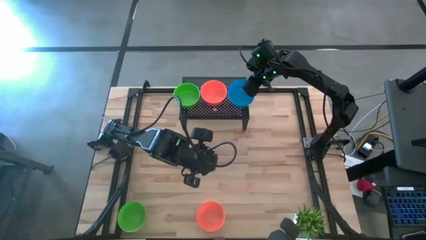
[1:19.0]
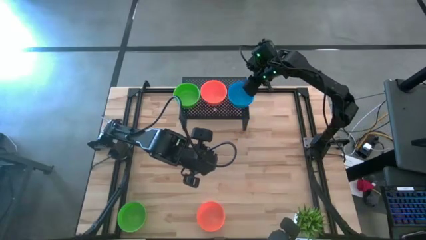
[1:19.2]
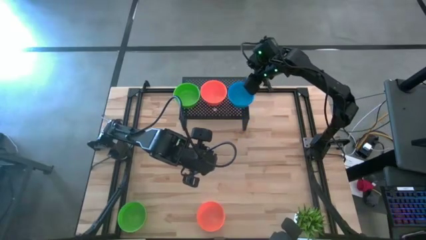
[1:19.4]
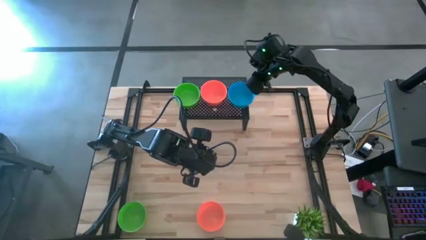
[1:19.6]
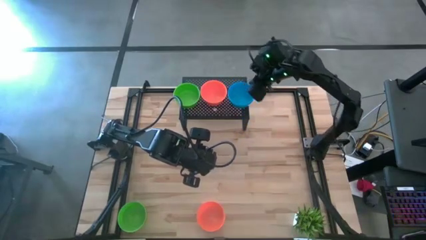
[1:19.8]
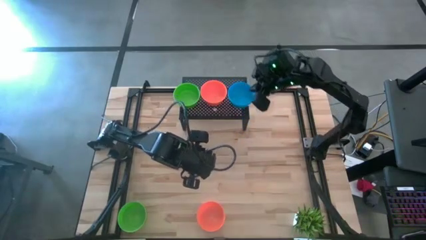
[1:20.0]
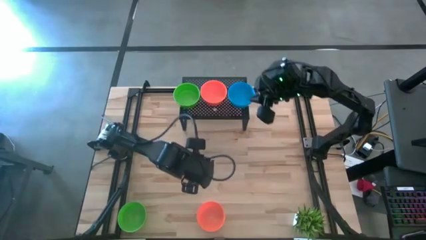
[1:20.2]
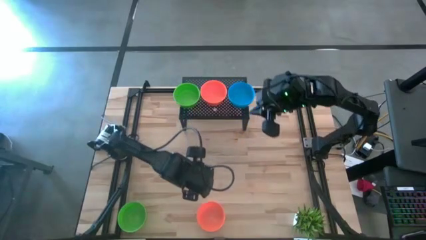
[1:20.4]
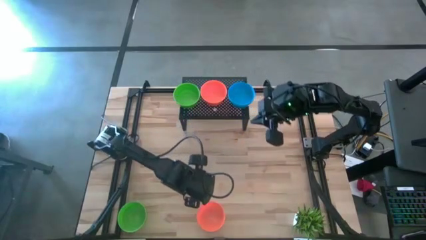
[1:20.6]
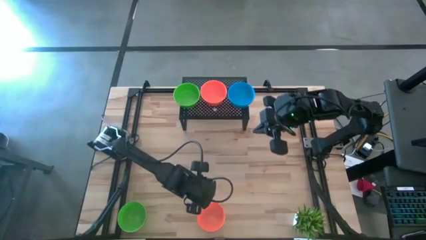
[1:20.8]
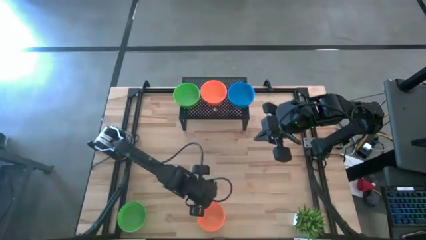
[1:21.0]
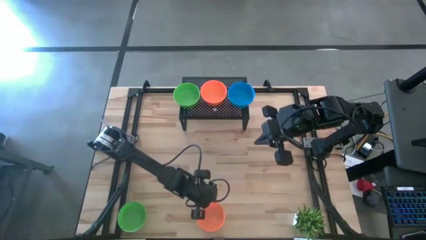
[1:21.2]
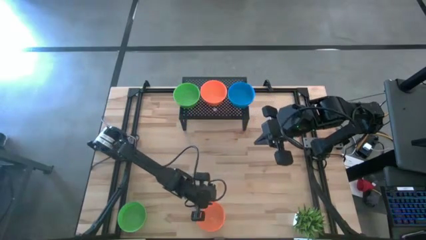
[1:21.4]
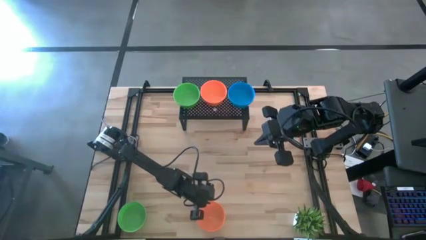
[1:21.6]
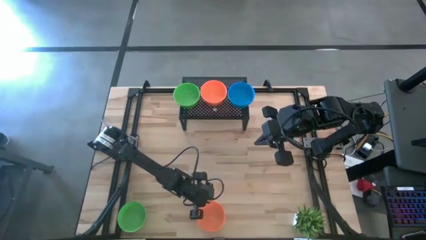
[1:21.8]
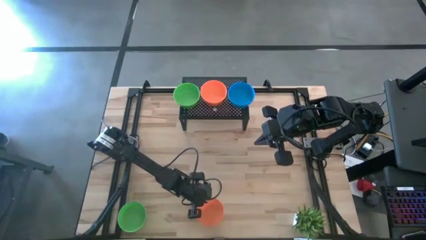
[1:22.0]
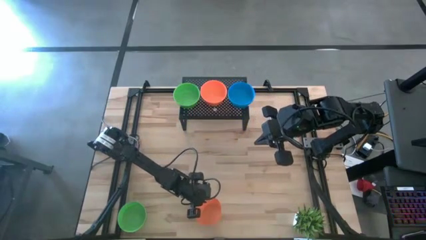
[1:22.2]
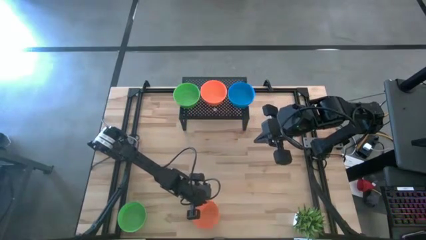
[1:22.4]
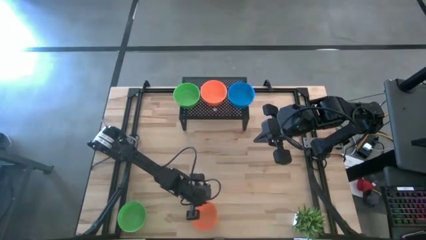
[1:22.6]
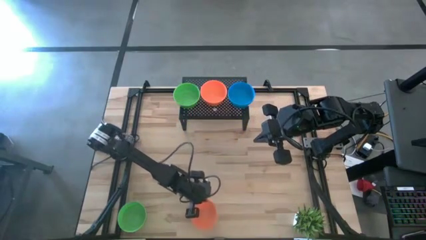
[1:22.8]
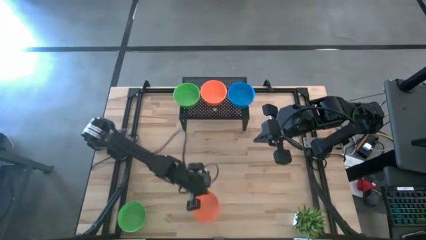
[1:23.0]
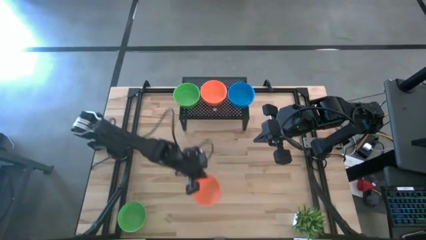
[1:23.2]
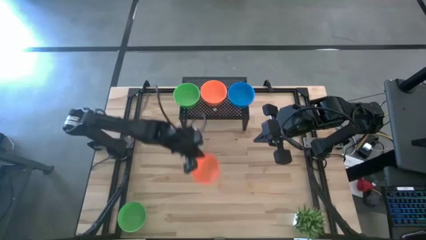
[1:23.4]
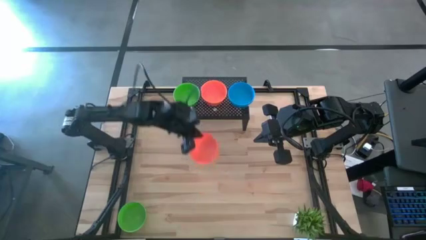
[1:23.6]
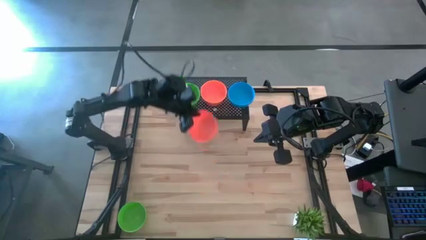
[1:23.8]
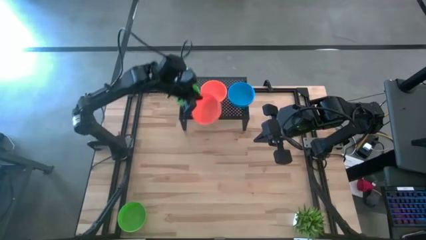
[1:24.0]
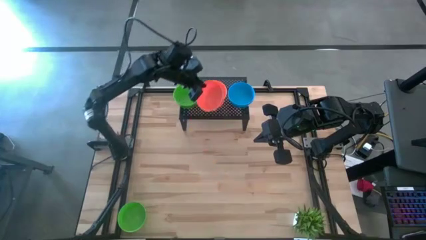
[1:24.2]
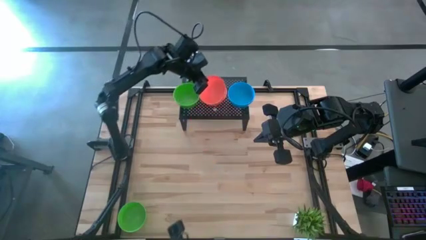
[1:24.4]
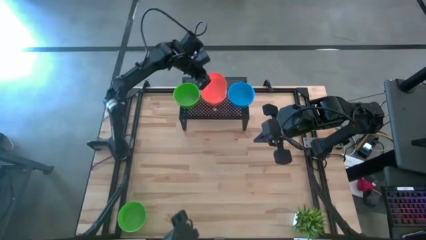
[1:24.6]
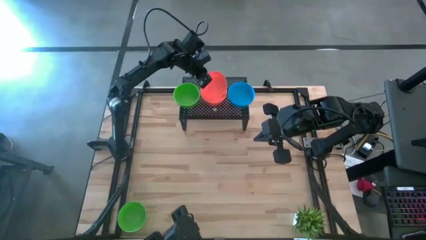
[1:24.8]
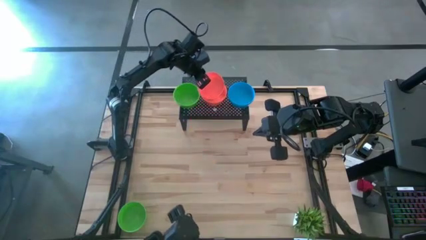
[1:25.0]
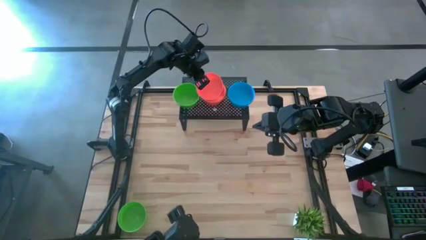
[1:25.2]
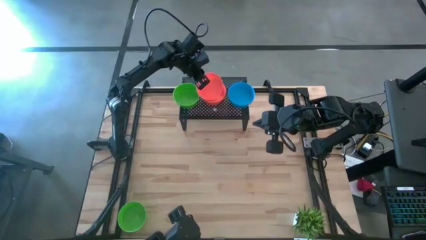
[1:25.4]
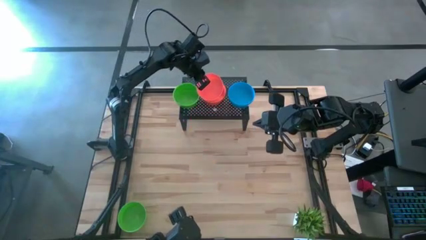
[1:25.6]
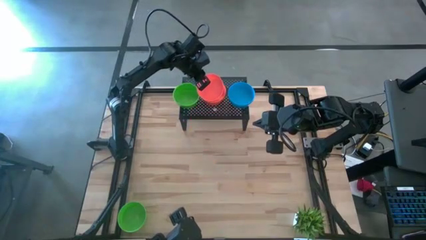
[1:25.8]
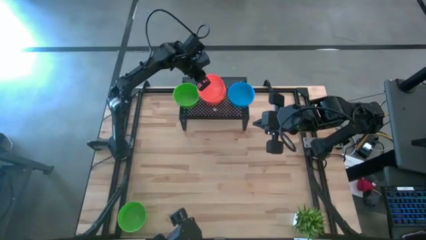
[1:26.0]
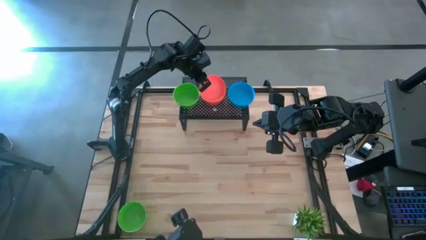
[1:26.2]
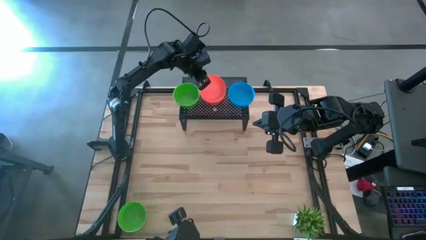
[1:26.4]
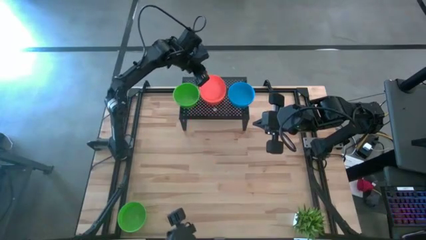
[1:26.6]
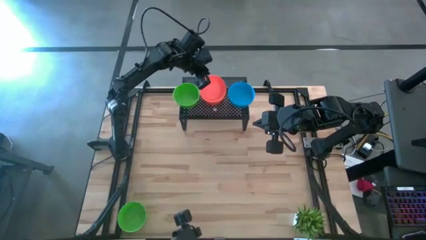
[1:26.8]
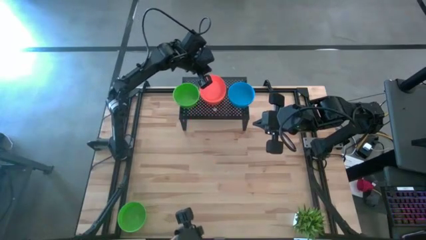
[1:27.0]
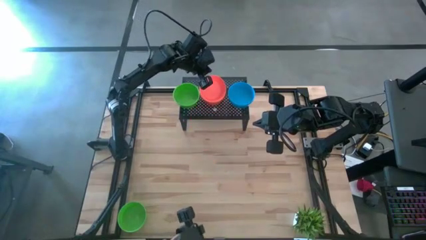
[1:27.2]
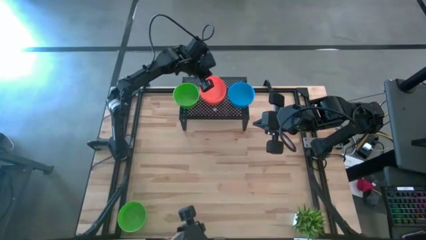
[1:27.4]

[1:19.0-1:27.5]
Task: Pick & Place Mini bowls
Stack the orange bowl on the orange bowls on the shelf

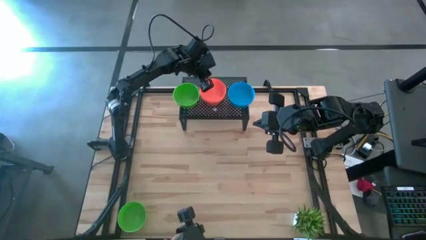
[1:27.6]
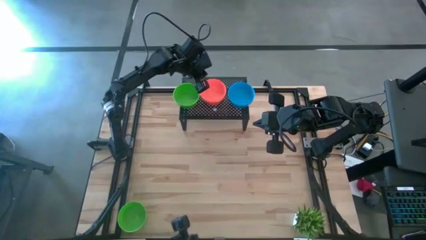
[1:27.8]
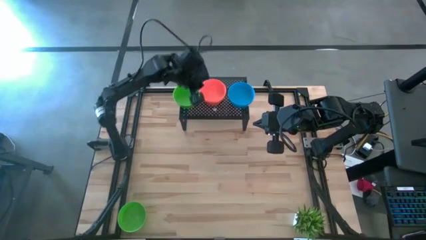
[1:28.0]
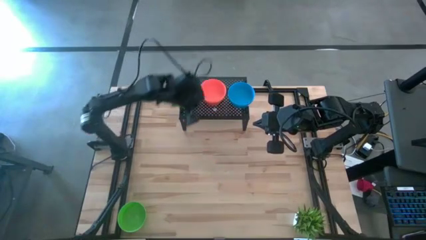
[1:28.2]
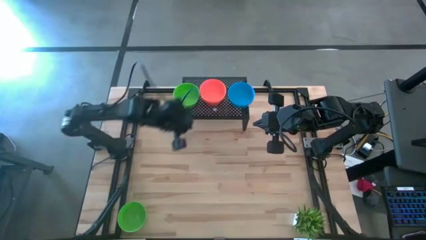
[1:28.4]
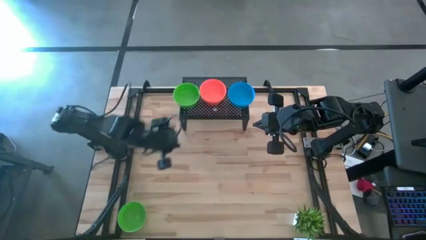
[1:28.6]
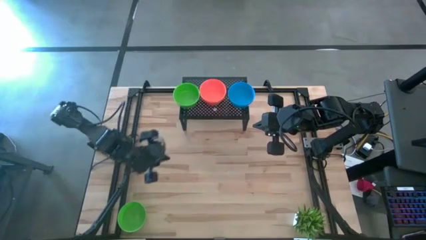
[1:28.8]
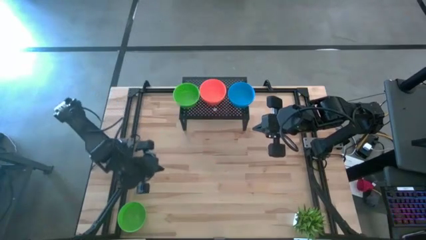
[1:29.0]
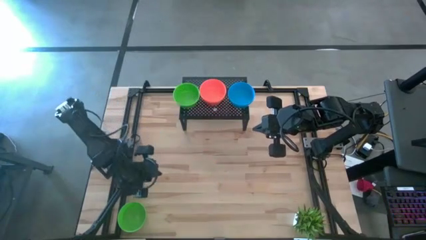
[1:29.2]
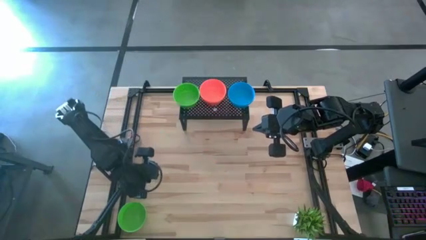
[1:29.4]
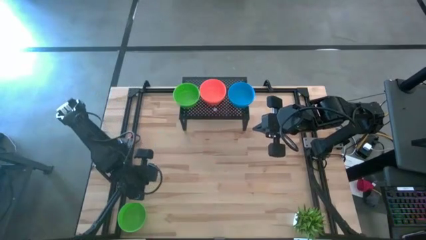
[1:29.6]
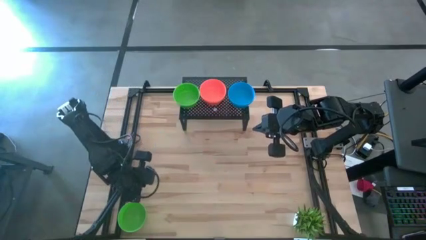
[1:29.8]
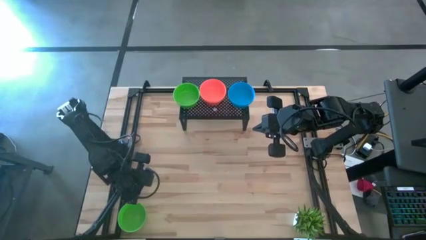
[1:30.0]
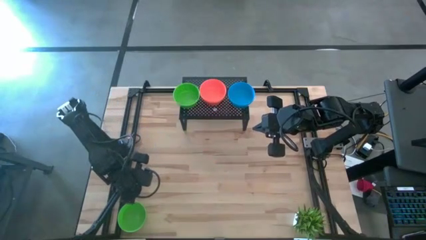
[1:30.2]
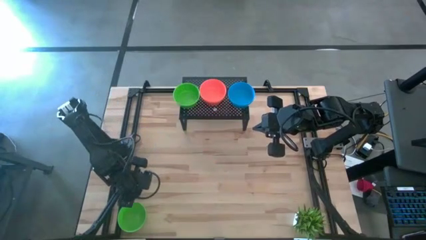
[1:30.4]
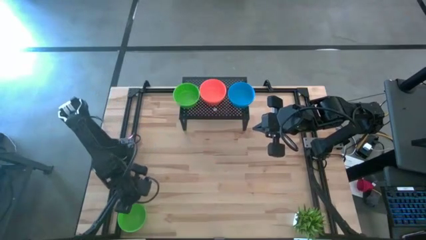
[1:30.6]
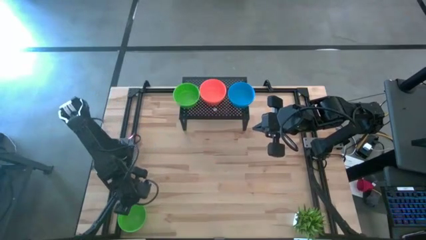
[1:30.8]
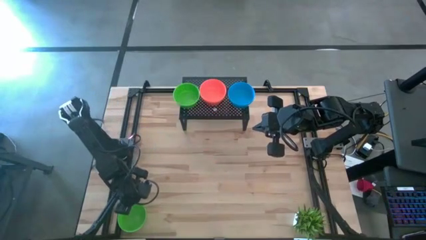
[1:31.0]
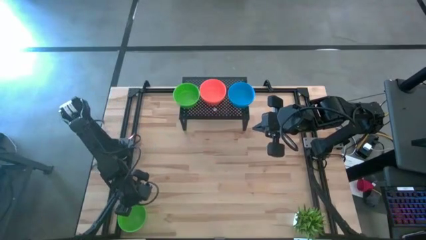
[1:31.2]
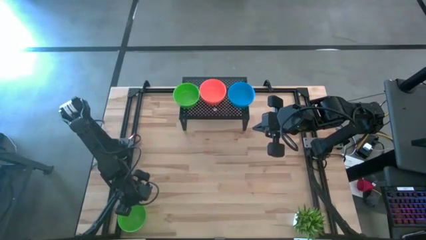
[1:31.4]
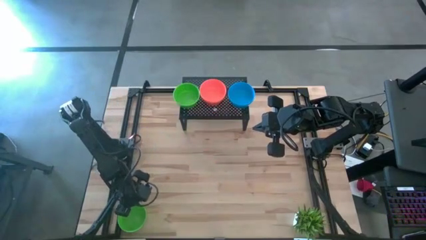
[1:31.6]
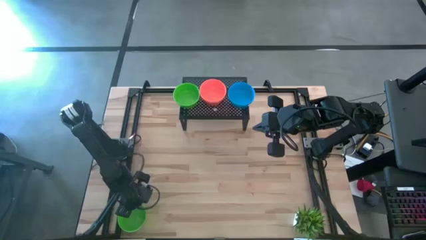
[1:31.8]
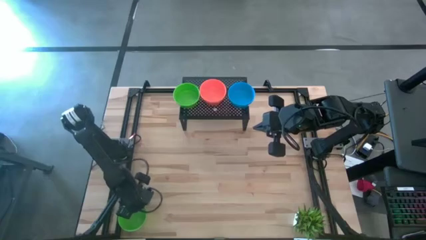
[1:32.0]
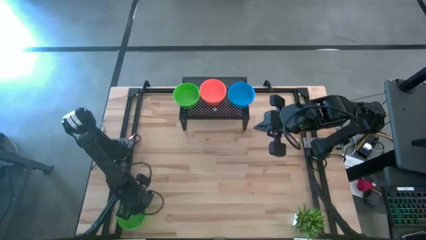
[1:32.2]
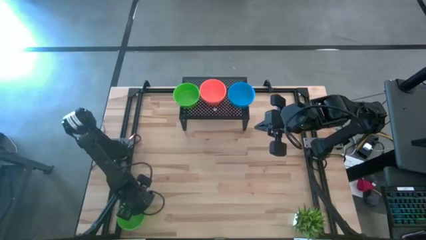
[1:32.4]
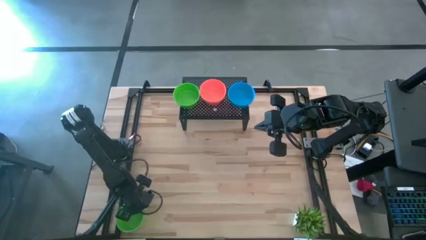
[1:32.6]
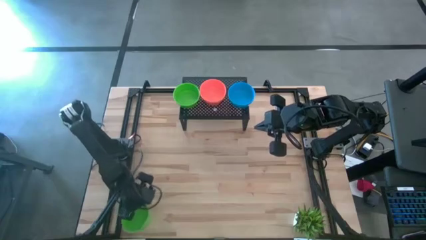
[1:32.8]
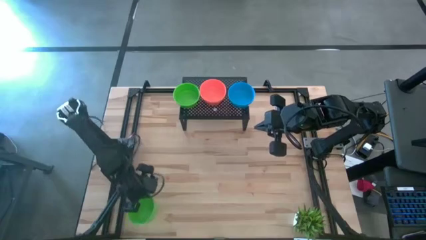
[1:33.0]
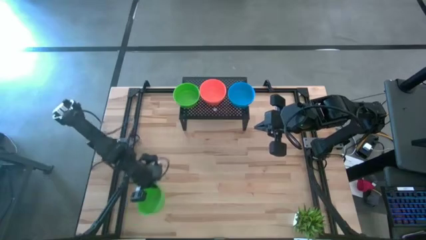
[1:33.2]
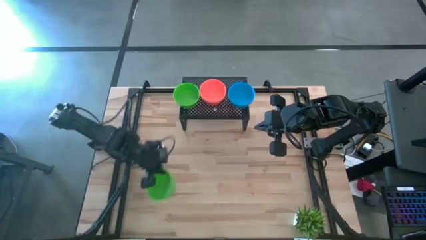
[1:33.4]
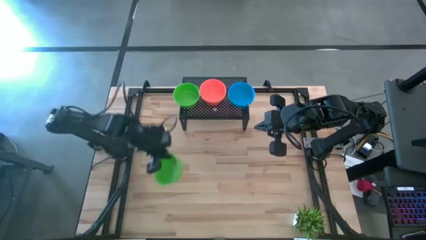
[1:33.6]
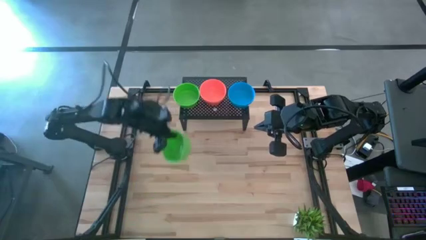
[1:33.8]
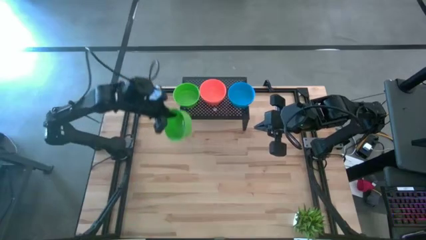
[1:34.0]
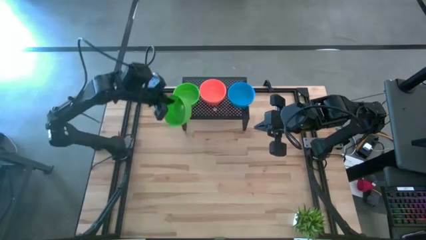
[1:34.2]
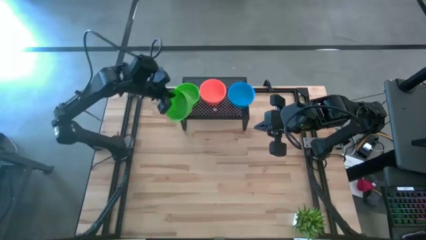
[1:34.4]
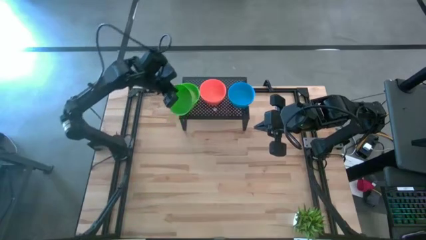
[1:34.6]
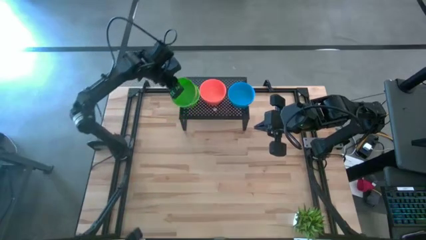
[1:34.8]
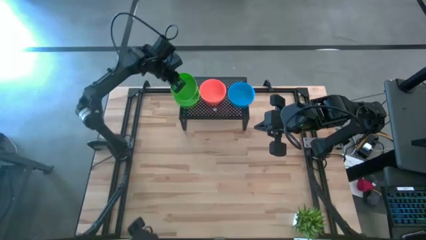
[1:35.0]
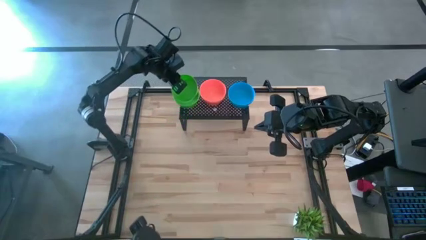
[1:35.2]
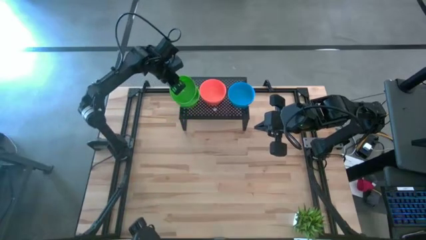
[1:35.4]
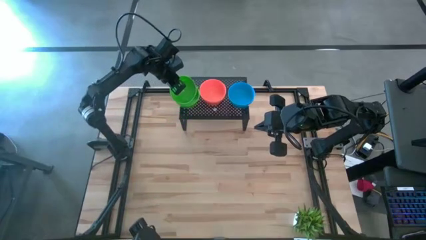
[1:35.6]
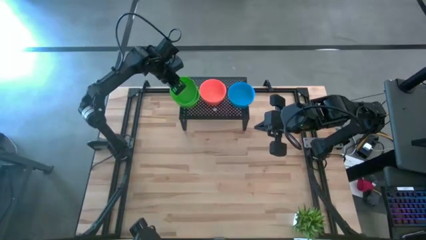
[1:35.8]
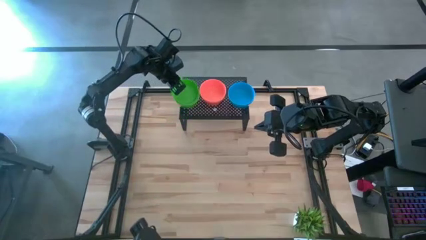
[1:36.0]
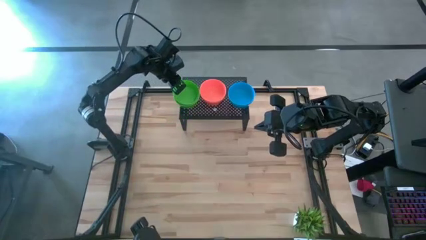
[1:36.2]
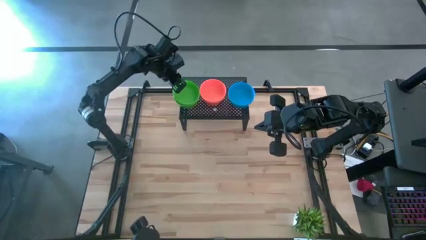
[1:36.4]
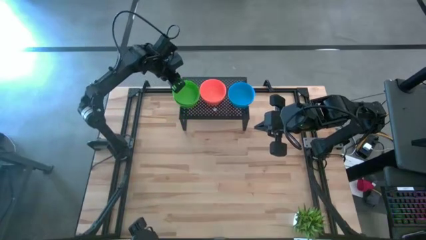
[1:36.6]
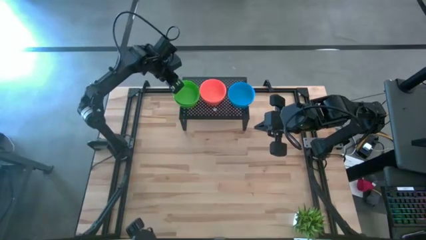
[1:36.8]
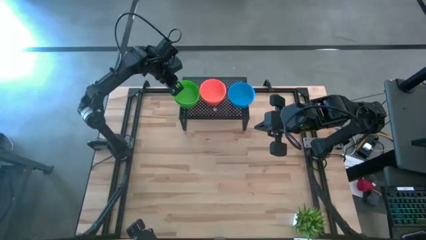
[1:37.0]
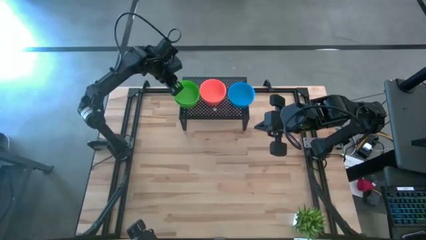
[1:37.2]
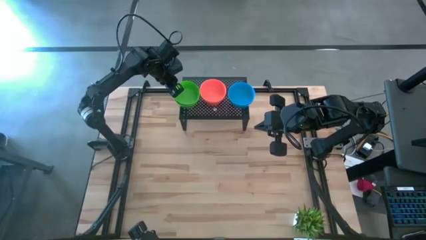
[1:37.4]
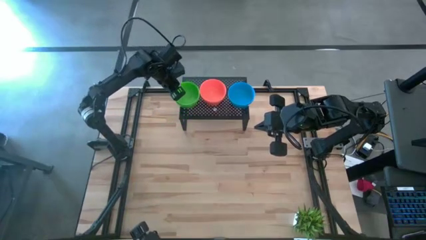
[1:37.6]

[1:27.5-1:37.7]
Stack the green bowl on the green bowls on the shelf
